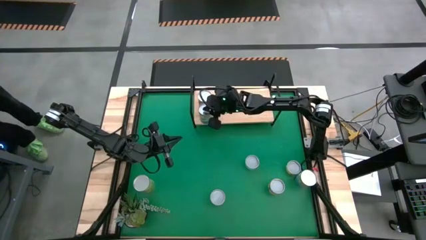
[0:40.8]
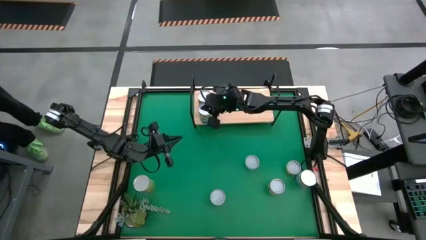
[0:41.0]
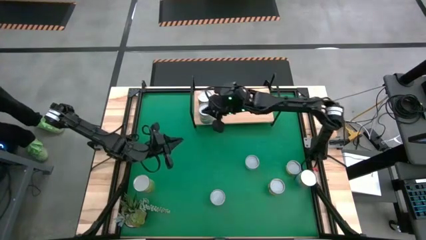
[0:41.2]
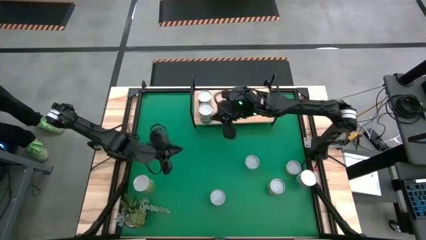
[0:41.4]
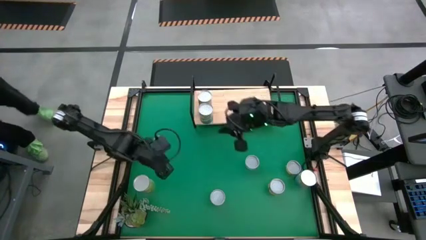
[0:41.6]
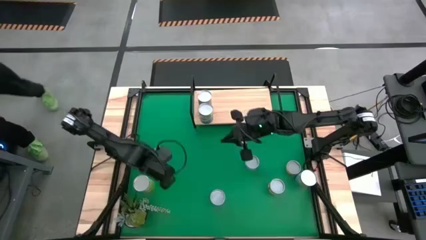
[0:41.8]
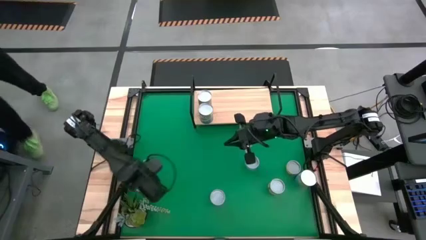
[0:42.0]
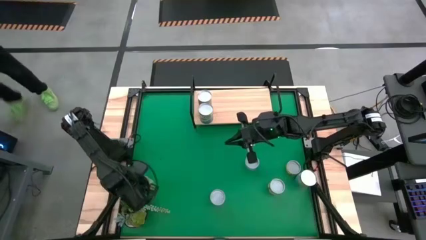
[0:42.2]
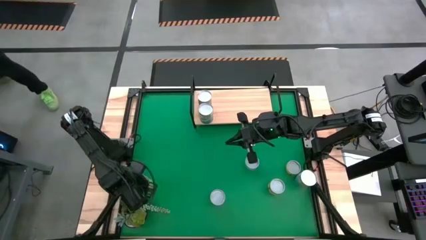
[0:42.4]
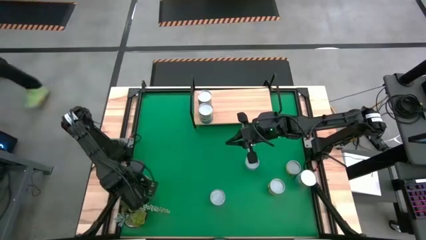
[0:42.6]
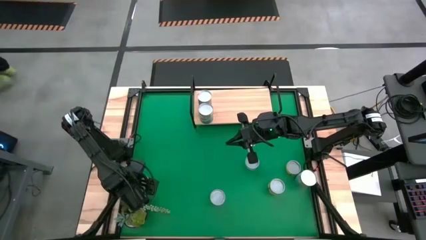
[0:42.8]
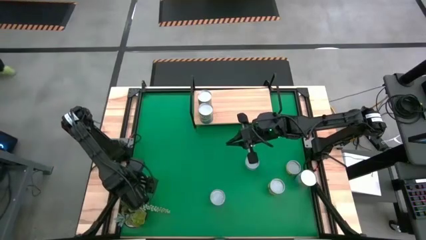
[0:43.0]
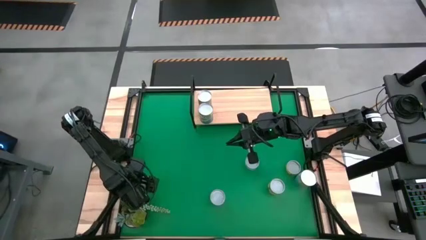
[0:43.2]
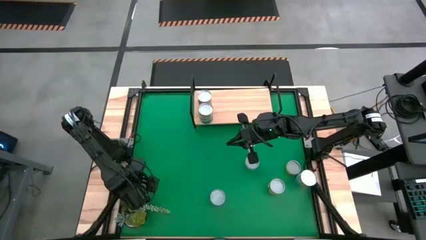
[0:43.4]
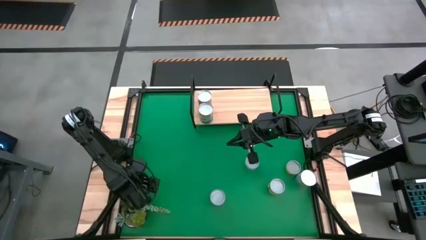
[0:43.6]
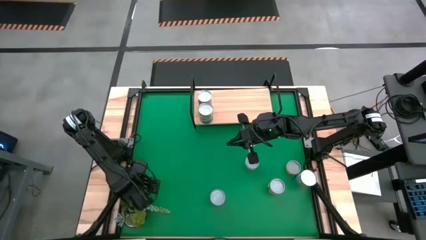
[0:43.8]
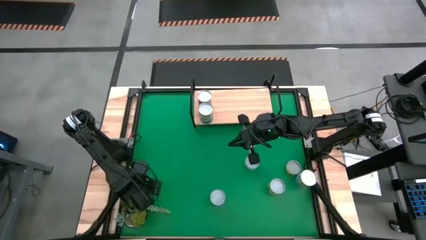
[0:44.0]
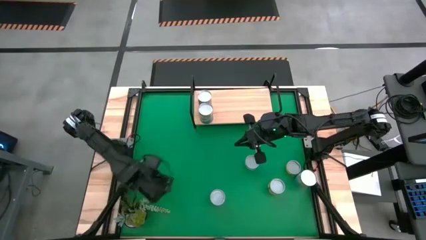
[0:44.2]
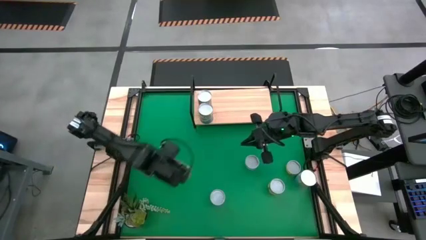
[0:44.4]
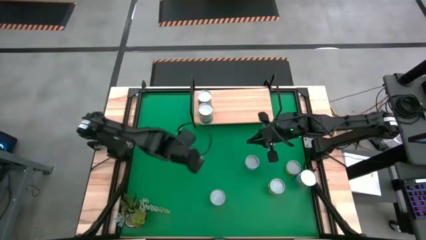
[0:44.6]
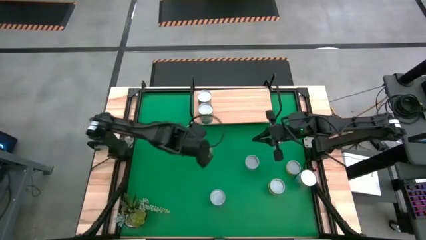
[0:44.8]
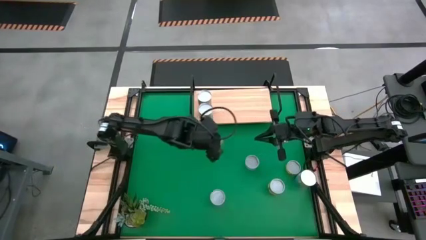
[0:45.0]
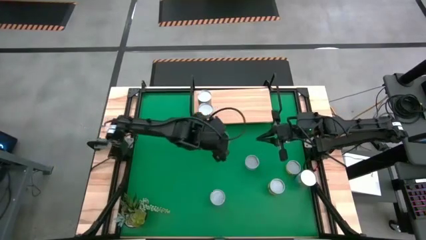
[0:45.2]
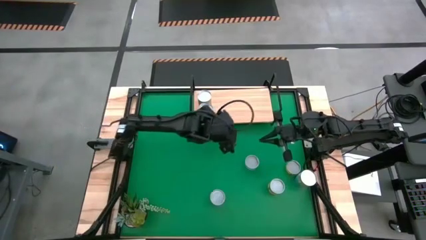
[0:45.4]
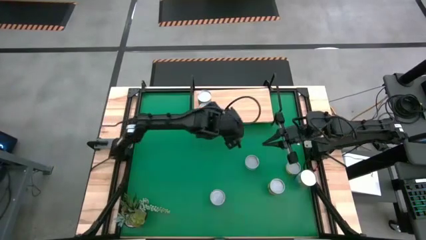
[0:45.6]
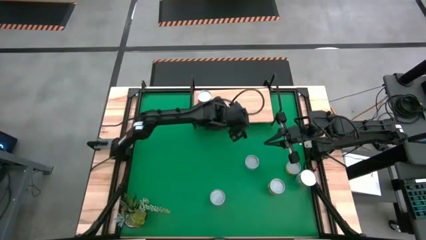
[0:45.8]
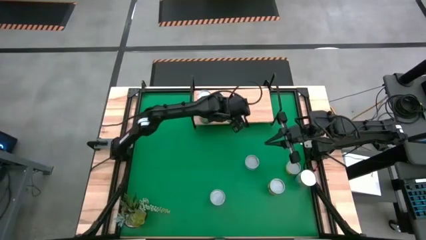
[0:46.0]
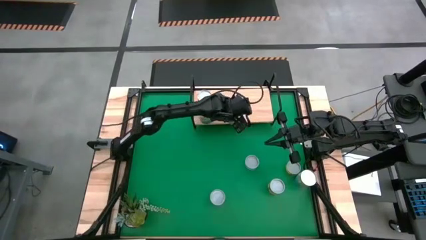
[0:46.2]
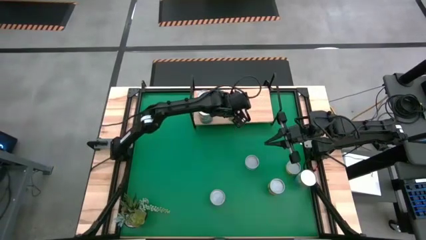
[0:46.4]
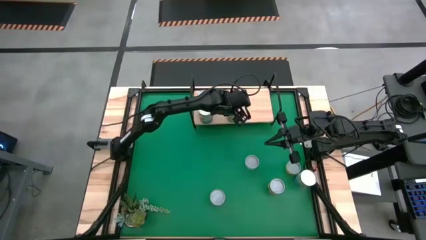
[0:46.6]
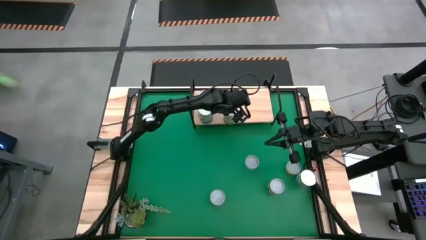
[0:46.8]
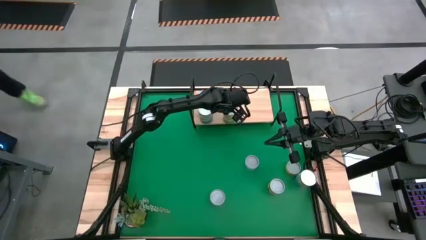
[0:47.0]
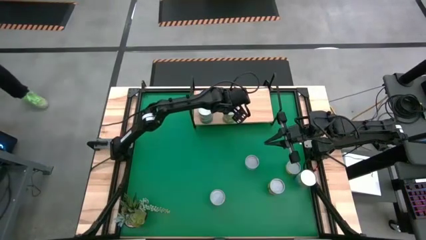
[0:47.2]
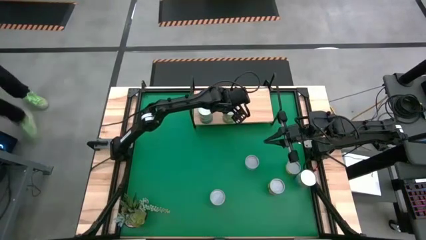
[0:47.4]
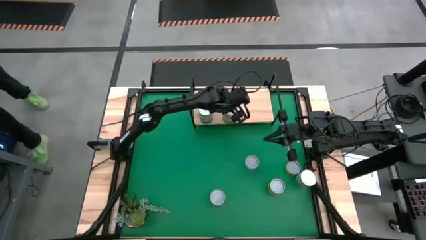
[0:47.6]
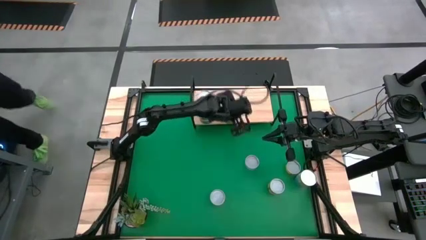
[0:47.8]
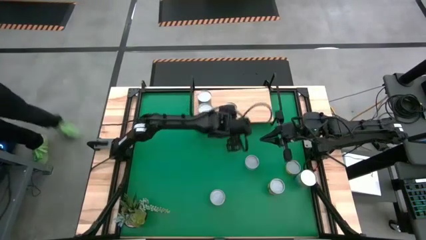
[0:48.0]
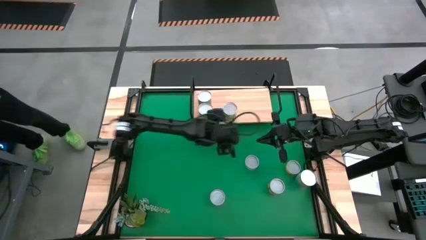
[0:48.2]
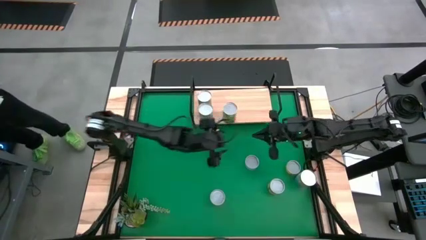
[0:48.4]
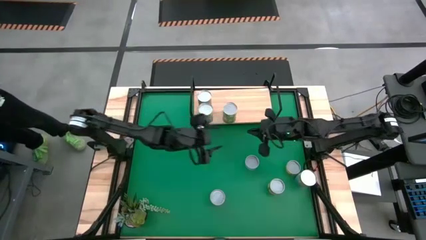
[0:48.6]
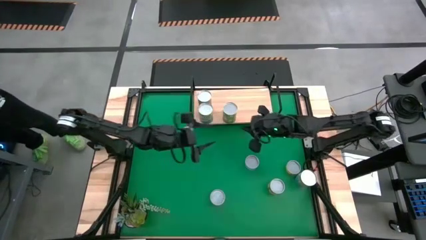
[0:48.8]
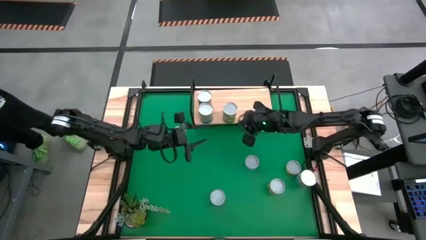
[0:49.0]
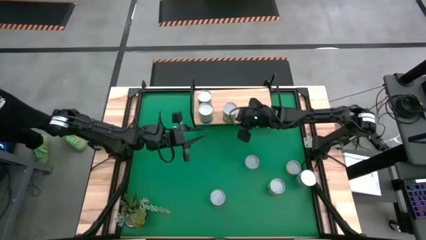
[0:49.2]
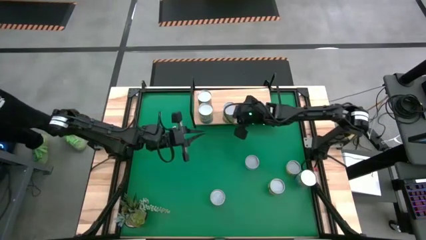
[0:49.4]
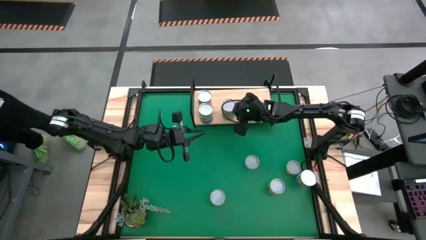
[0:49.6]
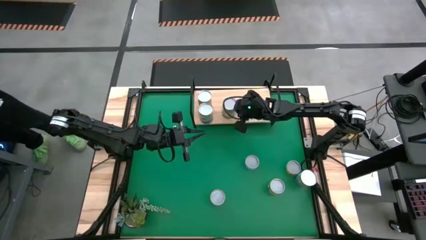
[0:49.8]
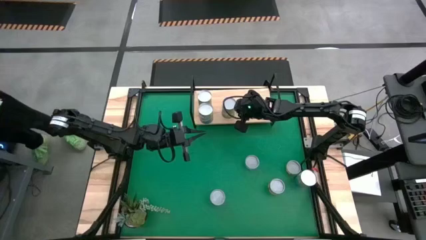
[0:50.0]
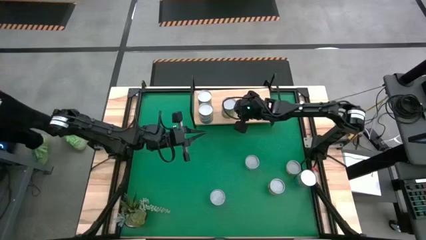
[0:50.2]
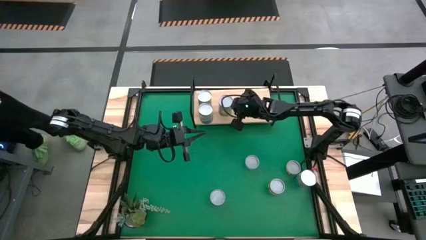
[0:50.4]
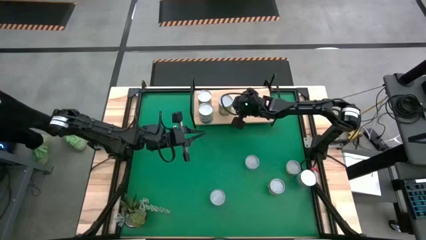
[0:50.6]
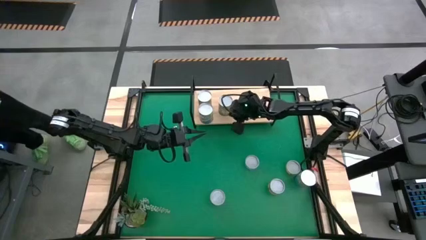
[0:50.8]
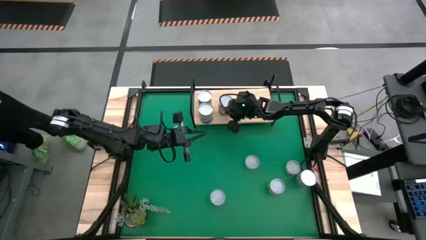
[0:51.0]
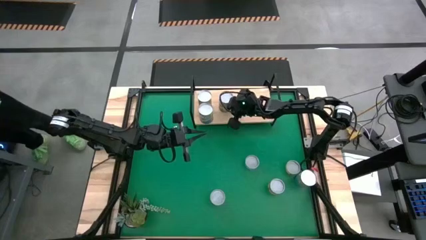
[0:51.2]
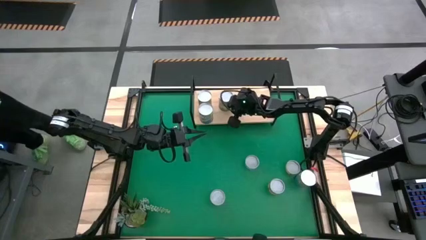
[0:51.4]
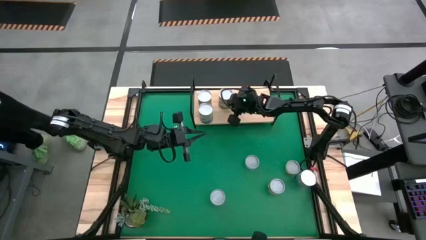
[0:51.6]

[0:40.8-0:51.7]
Task: Pick and place cans onto a shelf
Put the canned pears on the shelf

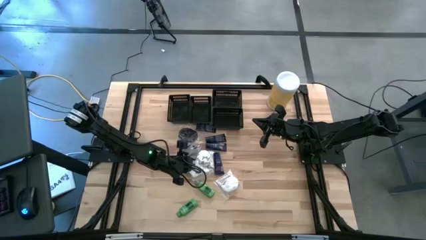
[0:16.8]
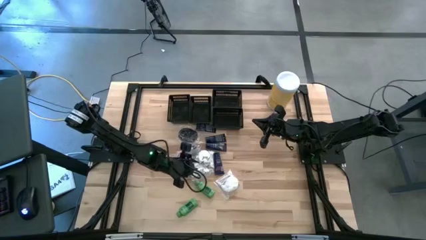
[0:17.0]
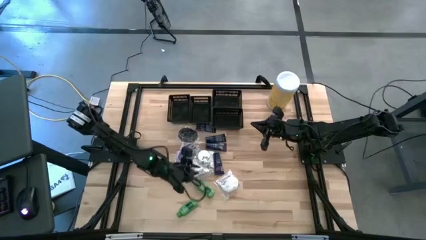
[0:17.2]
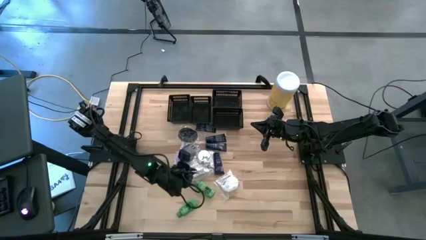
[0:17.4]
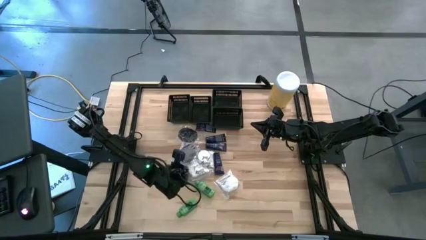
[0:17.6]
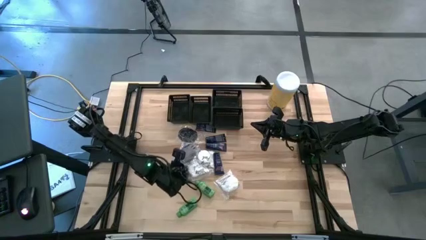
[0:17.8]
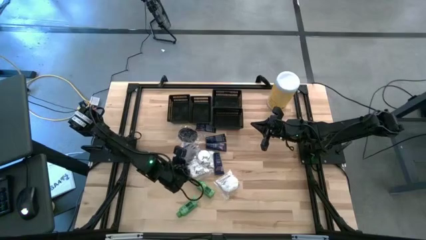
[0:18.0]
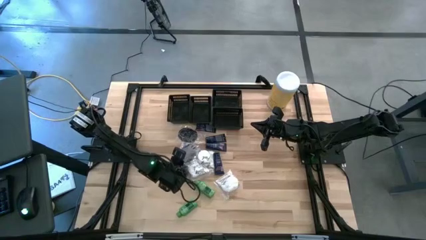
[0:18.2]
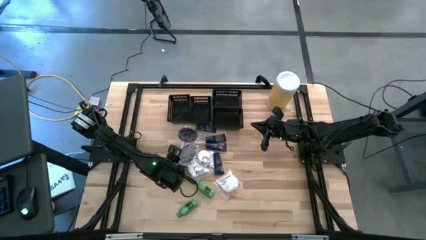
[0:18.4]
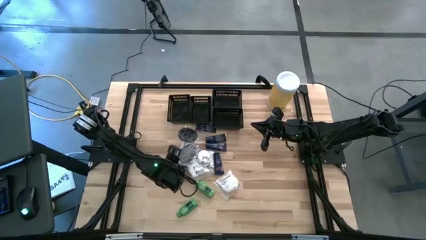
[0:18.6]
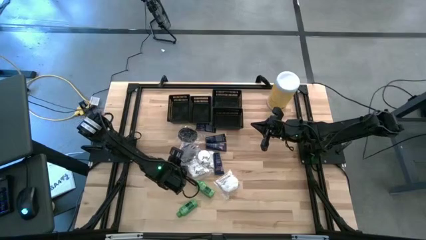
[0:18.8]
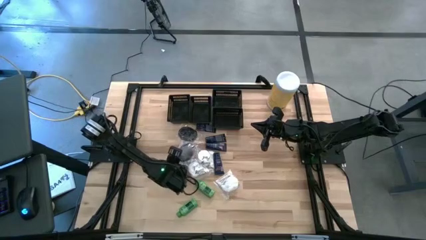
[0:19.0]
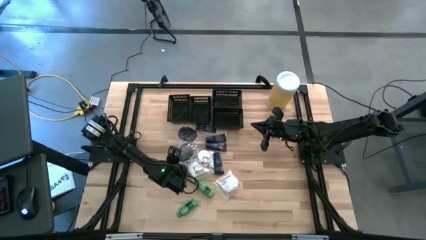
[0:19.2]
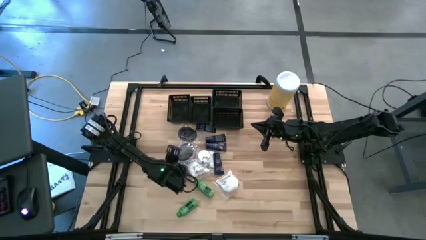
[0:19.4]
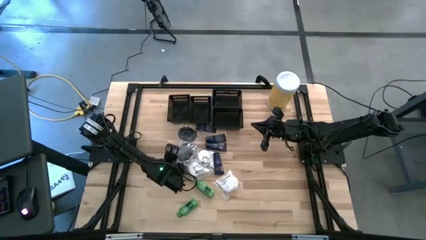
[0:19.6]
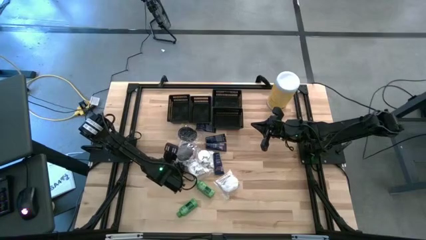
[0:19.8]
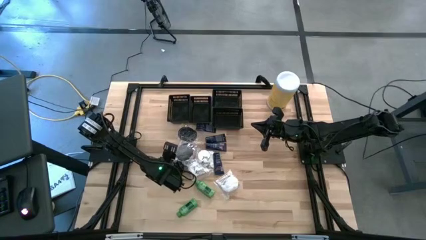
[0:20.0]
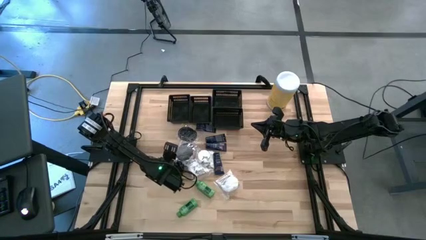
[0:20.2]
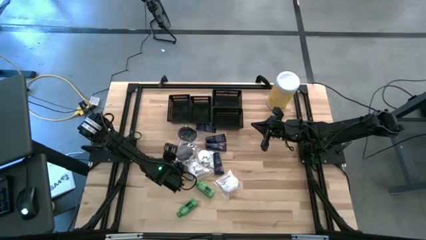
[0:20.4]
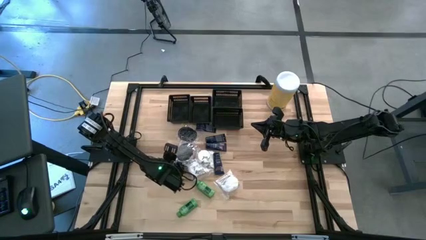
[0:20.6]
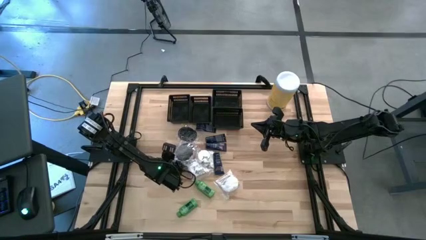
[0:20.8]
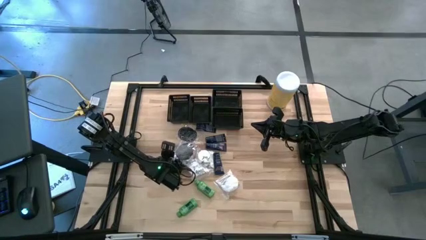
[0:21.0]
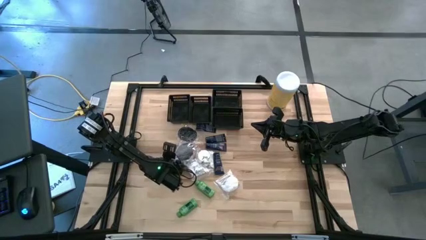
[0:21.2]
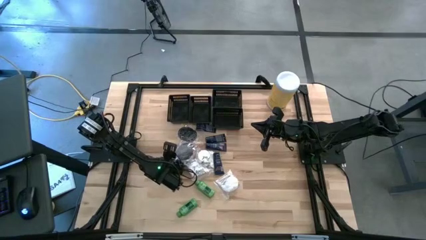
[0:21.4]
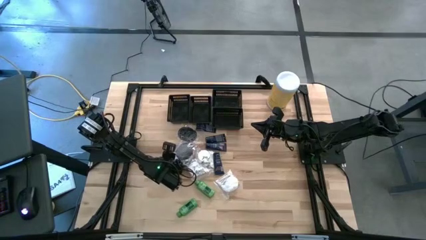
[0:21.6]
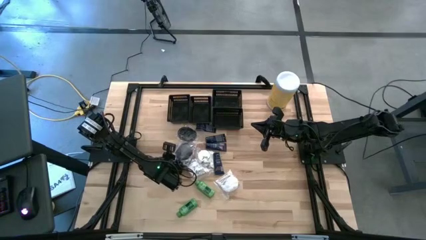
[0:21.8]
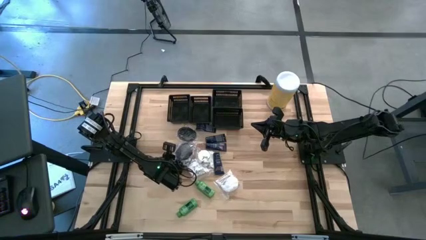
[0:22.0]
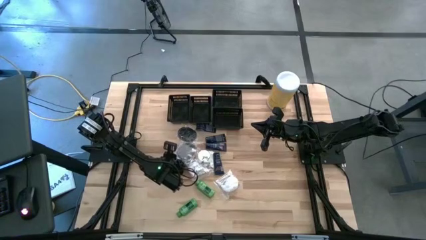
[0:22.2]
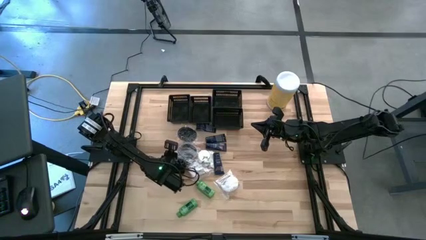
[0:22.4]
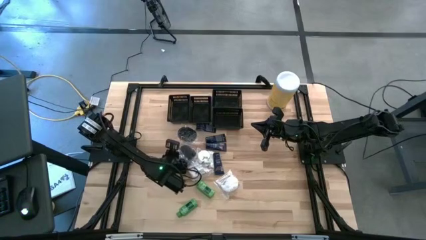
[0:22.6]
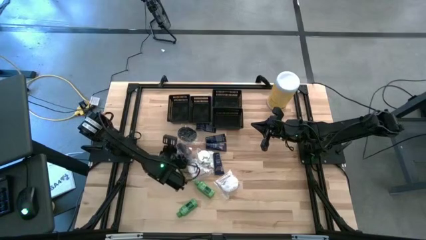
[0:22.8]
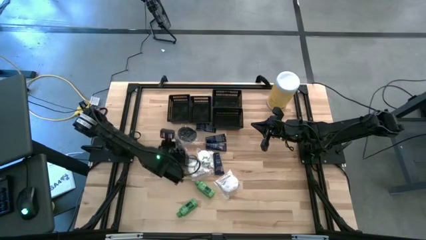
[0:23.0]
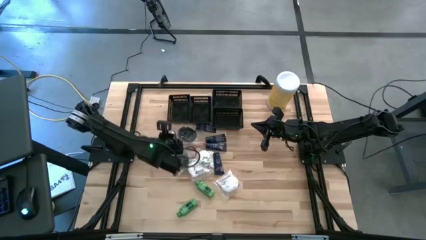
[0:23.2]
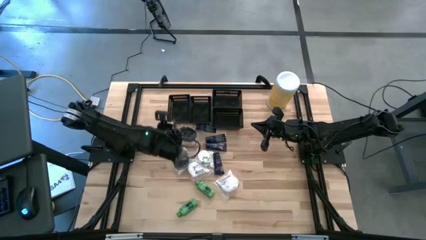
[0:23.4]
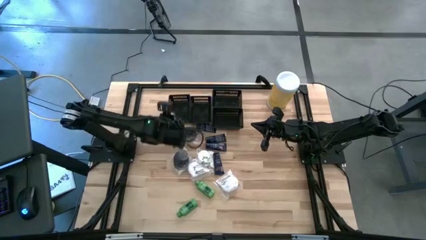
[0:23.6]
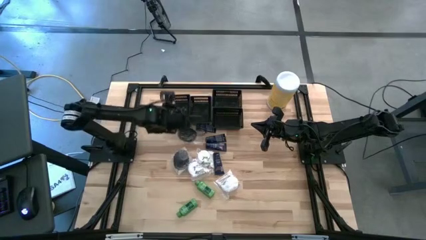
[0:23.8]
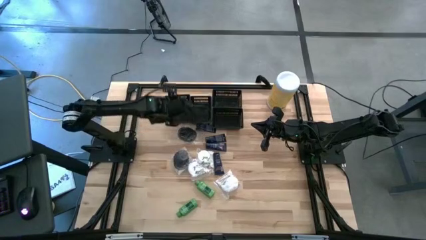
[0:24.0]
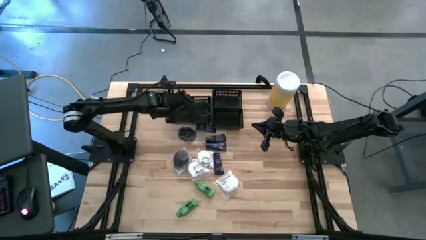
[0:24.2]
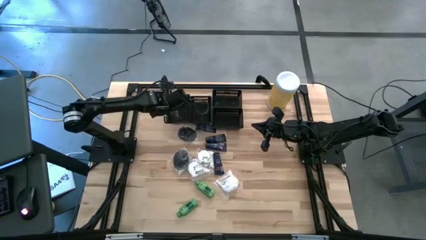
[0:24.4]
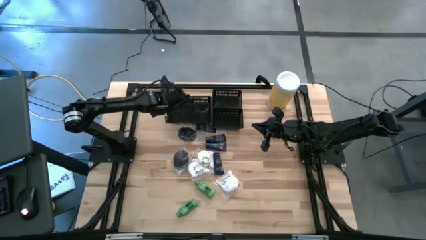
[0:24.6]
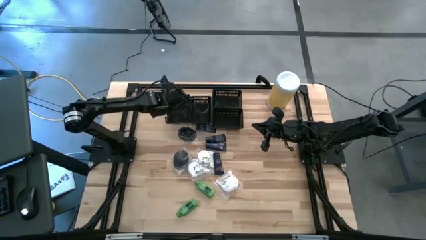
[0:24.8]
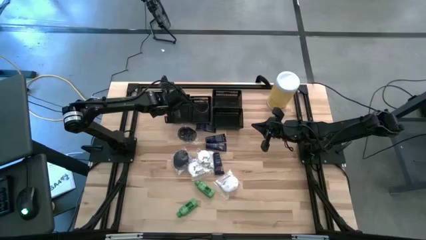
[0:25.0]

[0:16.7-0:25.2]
Task: Pick & Place Travel size toiletries
Put the middle black hairbrush into the left black bin
